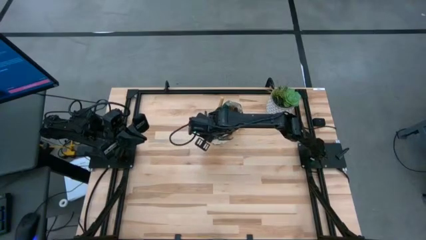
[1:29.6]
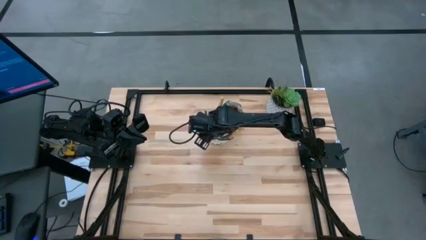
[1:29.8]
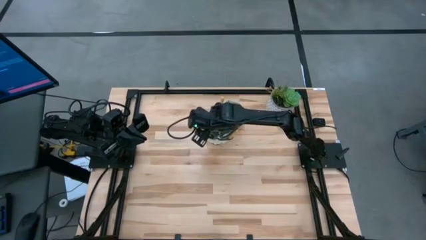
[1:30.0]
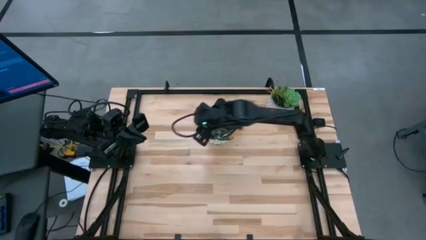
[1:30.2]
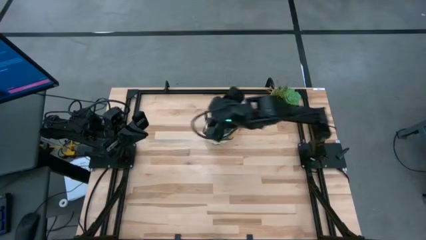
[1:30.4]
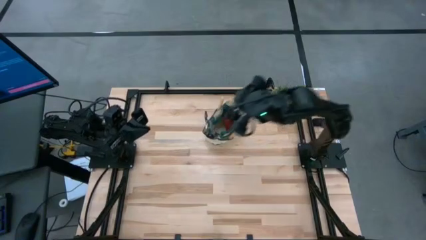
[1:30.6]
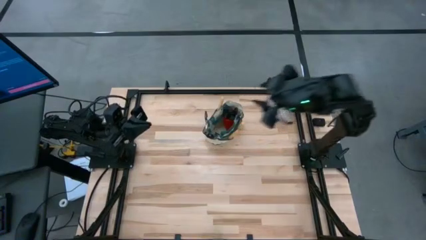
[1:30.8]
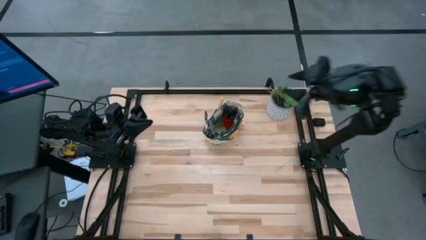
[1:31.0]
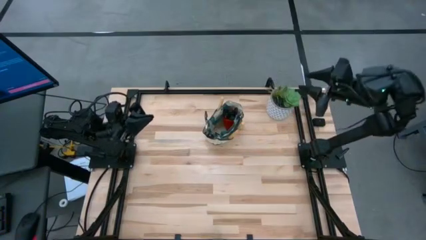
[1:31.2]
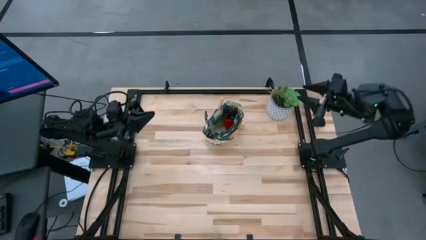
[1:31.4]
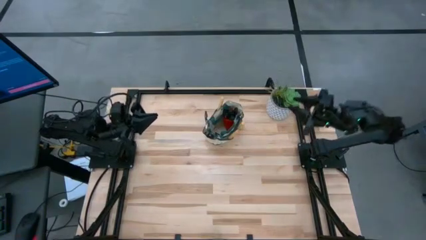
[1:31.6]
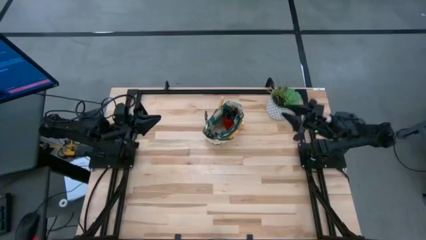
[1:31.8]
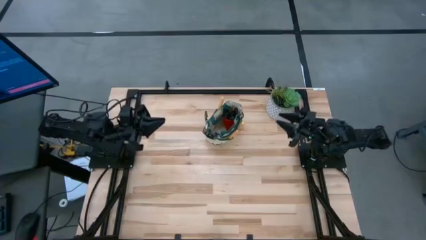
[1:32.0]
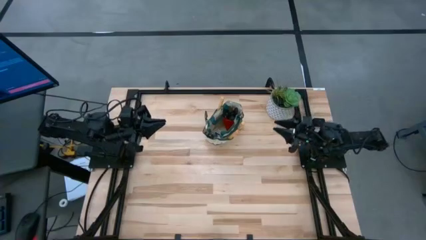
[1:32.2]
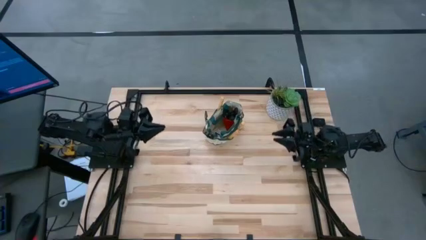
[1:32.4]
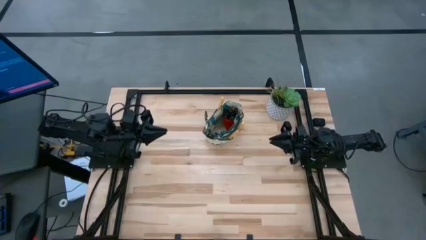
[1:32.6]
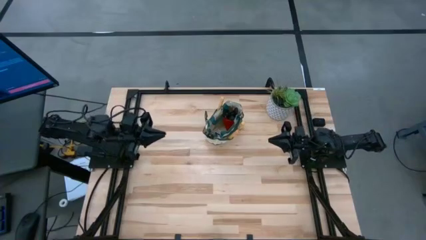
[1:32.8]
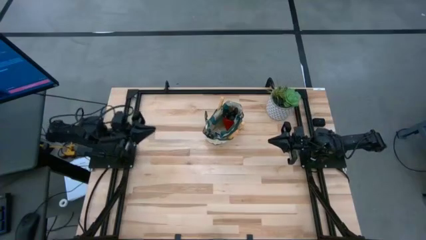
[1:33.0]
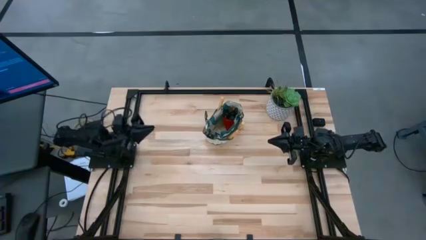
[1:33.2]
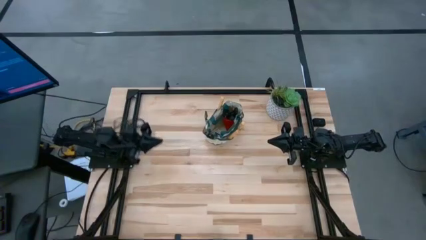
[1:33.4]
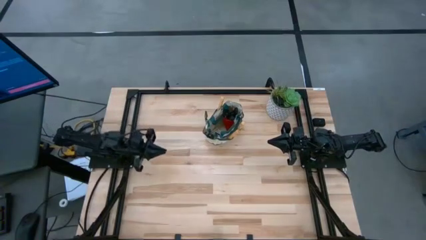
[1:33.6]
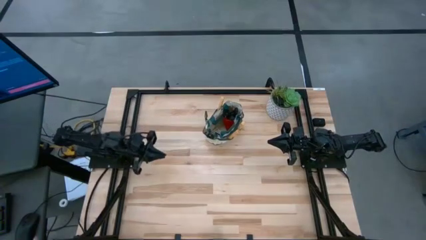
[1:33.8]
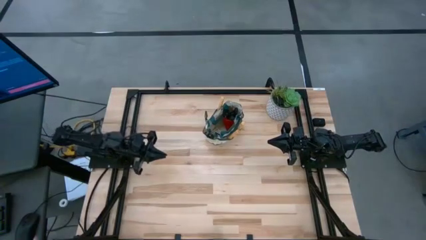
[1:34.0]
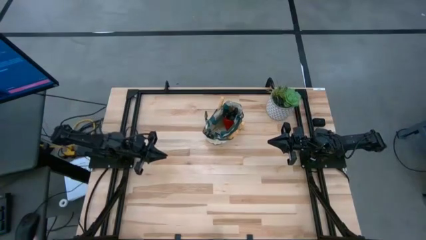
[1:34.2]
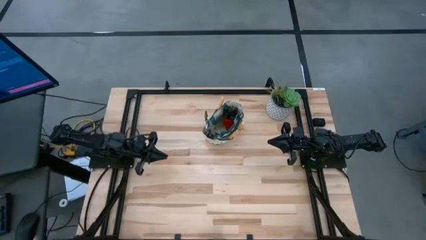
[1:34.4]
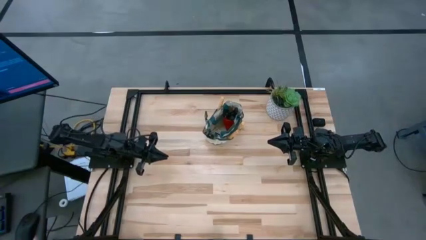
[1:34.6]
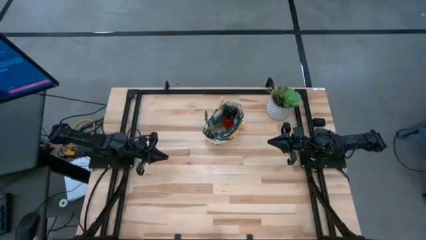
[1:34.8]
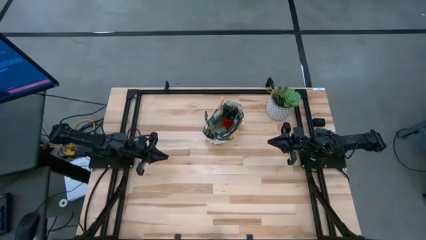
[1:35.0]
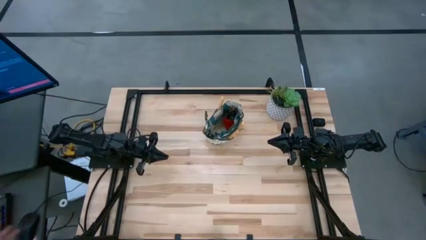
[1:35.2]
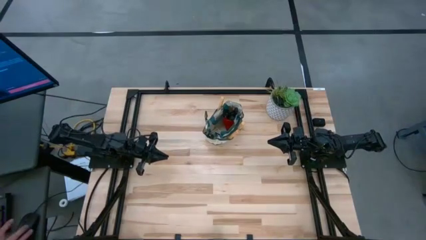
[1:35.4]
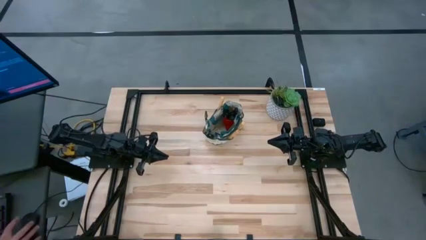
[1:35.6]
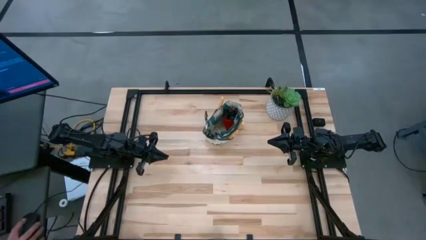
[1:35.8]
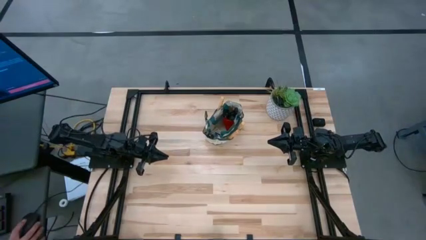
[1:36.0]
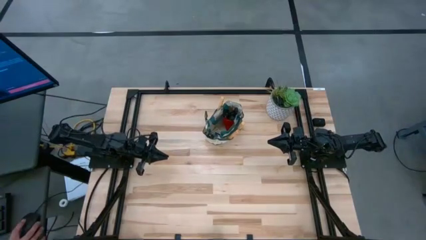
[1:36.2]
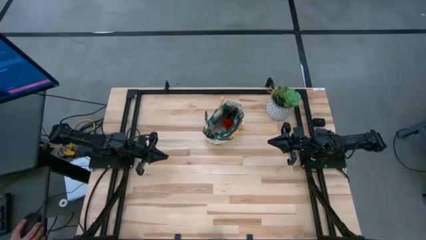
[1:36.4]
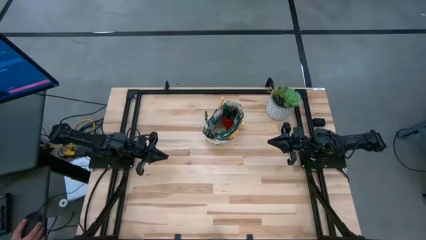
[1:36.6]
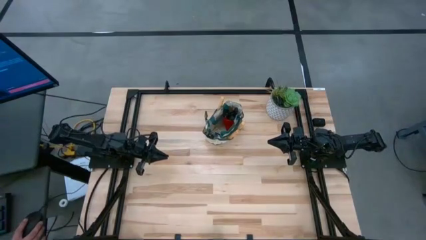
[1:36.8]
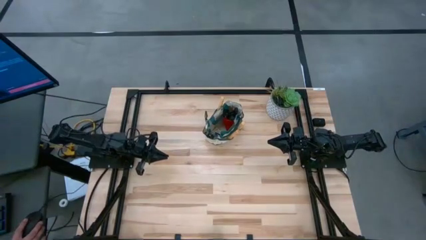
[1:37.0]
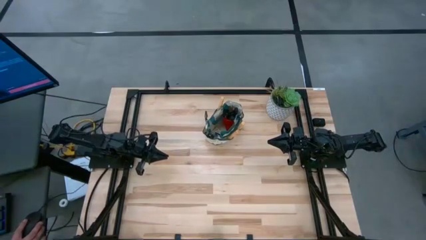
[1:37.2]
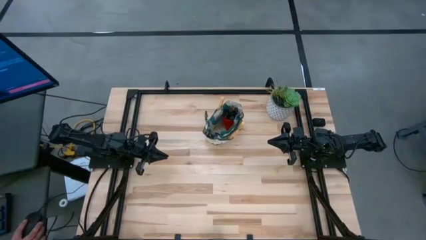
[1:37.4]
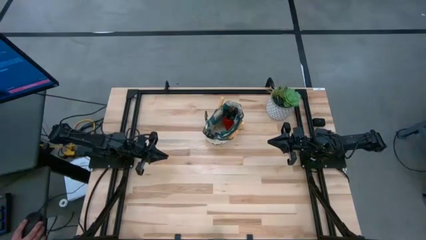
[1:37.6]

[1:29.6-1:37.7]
Task: Pick & Place Garden tools in Gardening bag
Return to Home Position

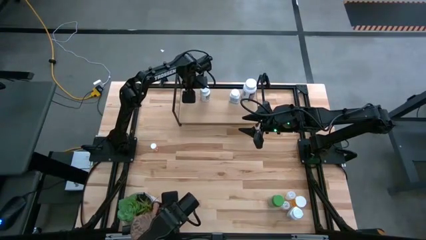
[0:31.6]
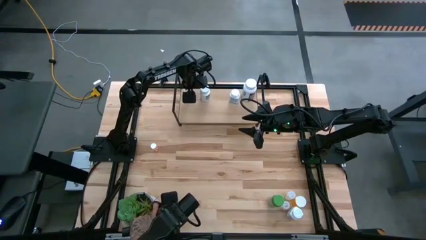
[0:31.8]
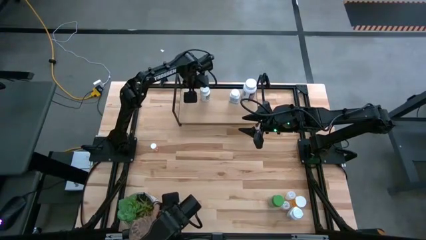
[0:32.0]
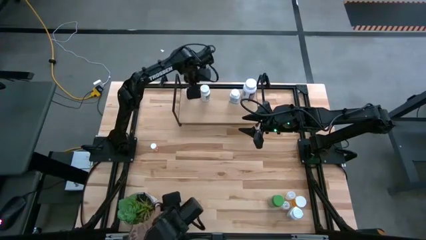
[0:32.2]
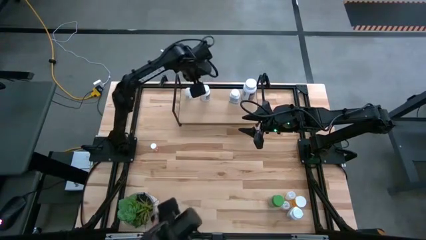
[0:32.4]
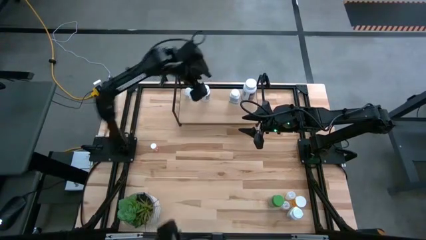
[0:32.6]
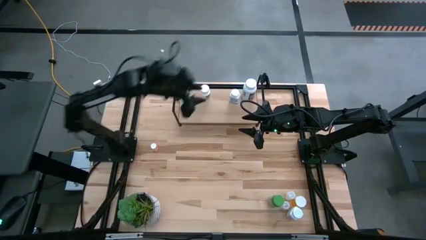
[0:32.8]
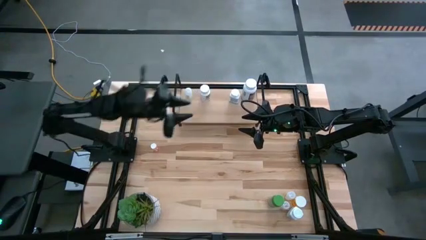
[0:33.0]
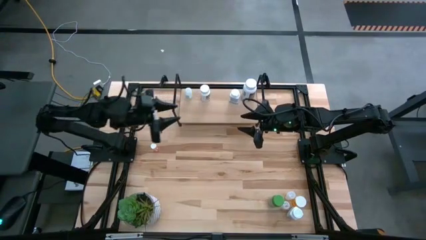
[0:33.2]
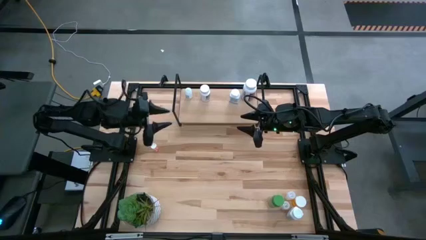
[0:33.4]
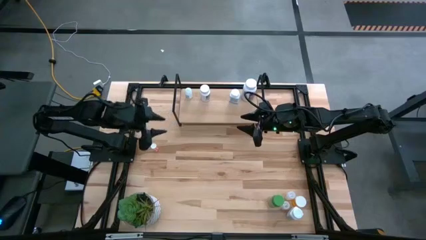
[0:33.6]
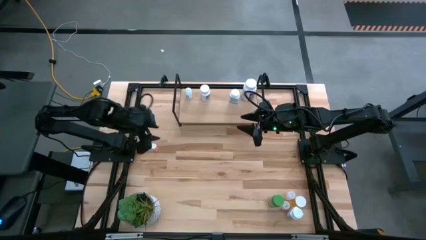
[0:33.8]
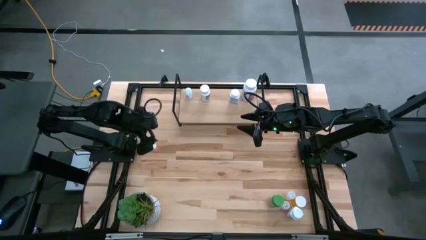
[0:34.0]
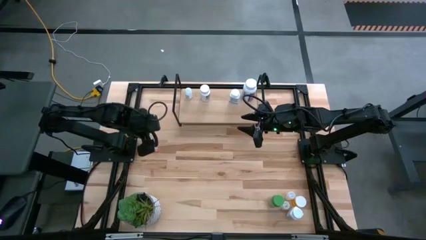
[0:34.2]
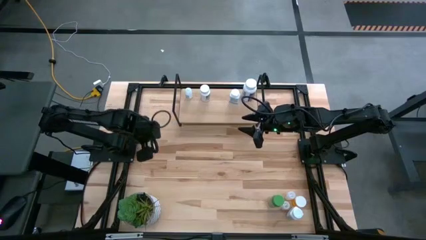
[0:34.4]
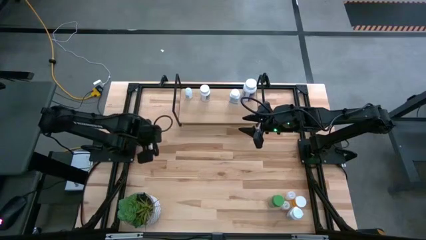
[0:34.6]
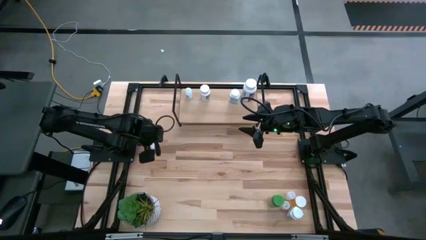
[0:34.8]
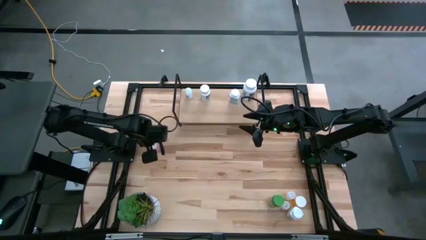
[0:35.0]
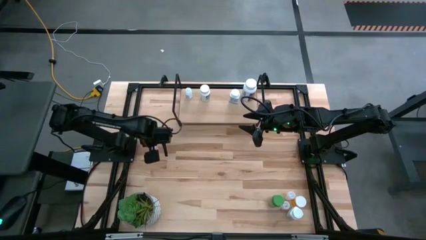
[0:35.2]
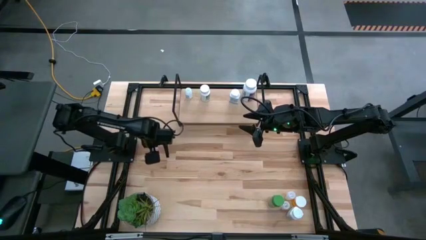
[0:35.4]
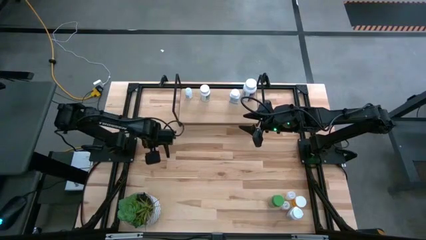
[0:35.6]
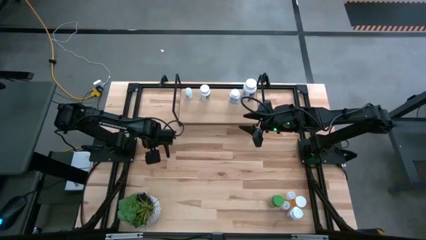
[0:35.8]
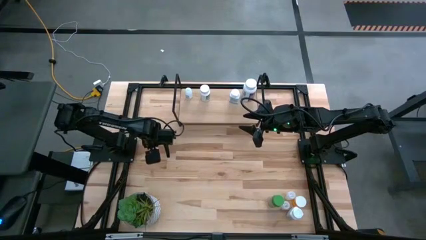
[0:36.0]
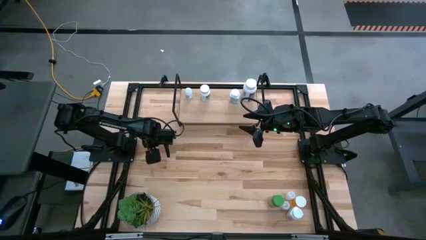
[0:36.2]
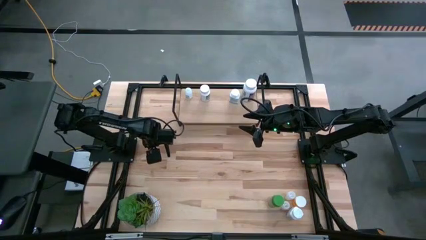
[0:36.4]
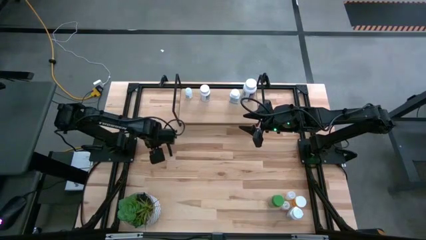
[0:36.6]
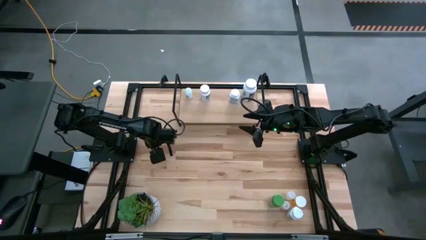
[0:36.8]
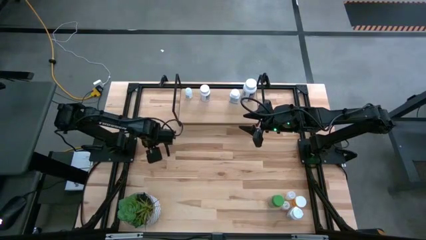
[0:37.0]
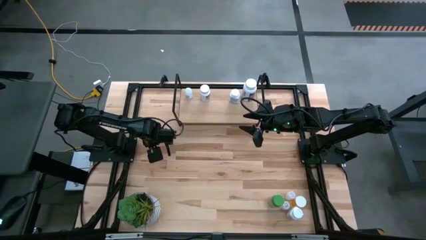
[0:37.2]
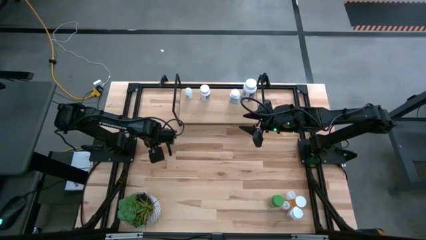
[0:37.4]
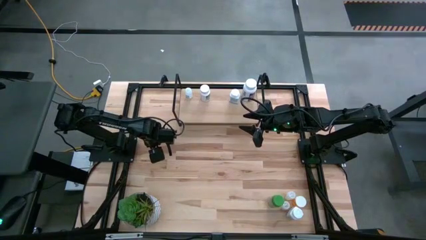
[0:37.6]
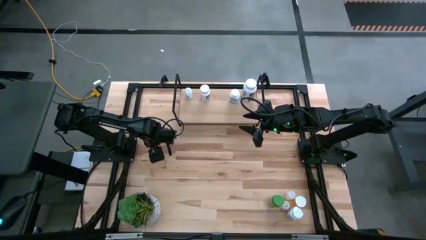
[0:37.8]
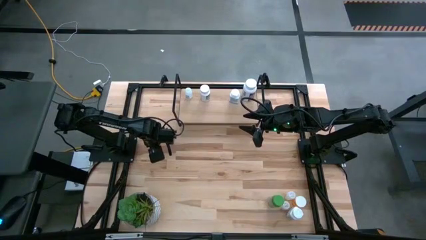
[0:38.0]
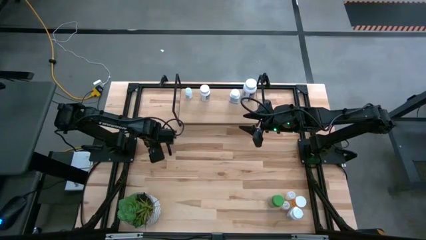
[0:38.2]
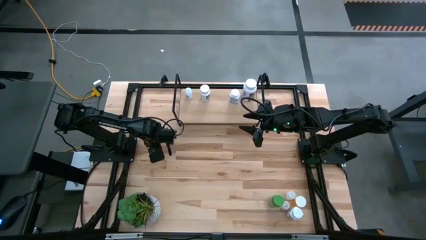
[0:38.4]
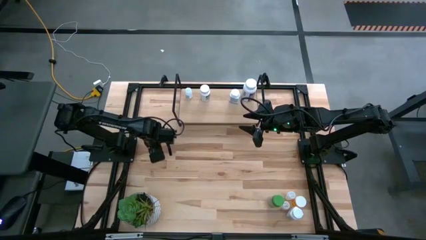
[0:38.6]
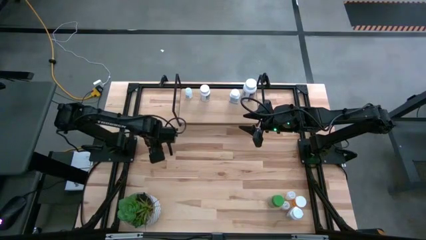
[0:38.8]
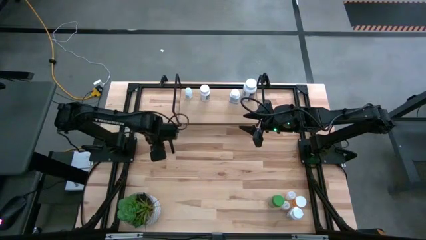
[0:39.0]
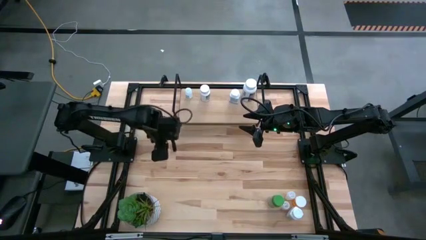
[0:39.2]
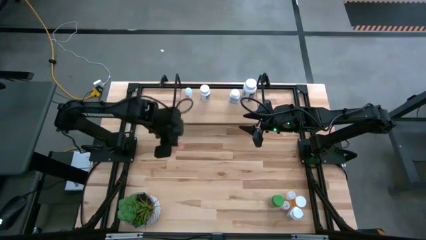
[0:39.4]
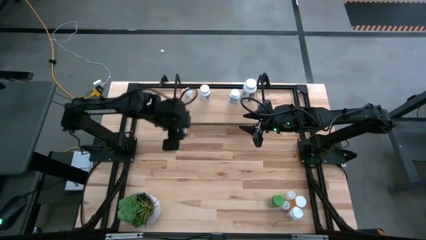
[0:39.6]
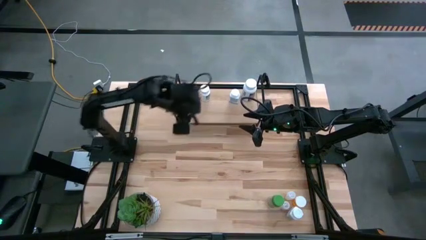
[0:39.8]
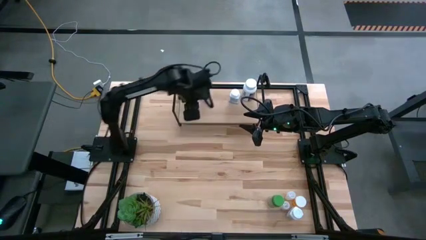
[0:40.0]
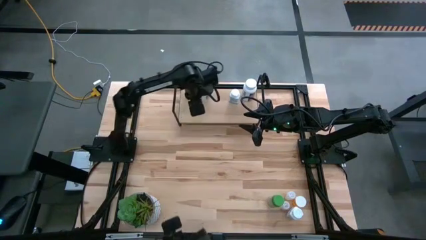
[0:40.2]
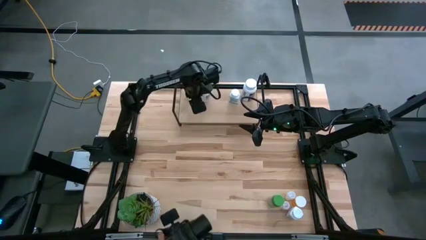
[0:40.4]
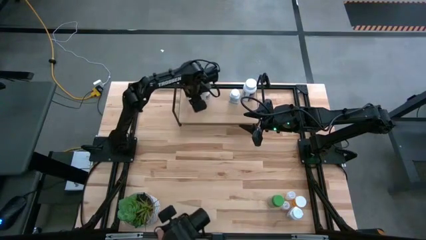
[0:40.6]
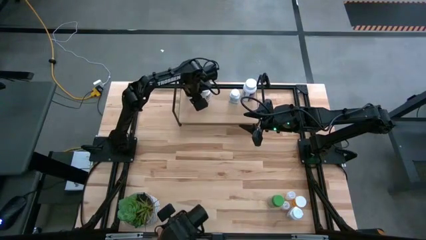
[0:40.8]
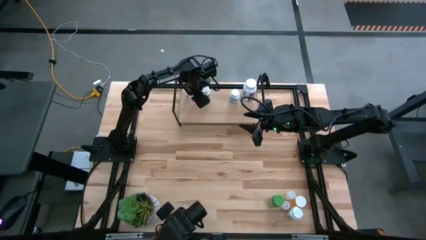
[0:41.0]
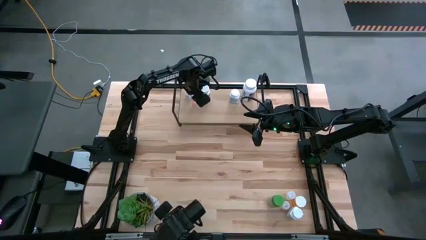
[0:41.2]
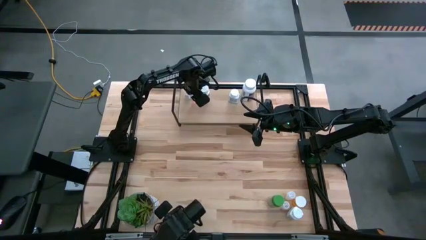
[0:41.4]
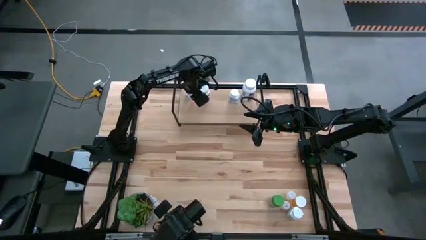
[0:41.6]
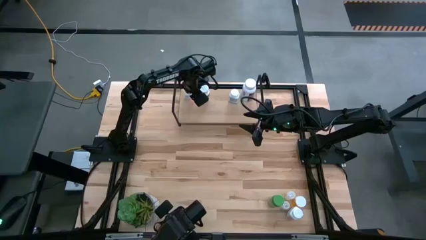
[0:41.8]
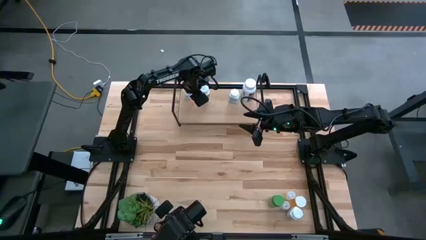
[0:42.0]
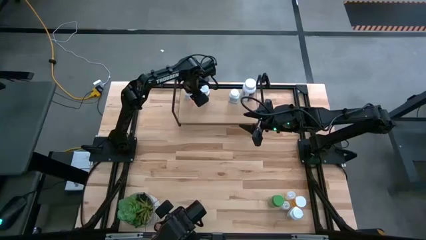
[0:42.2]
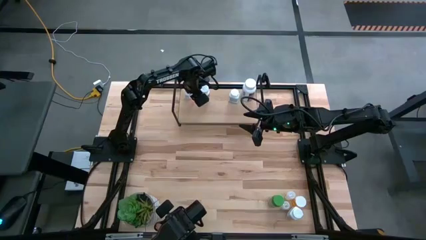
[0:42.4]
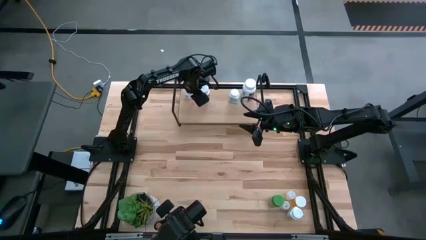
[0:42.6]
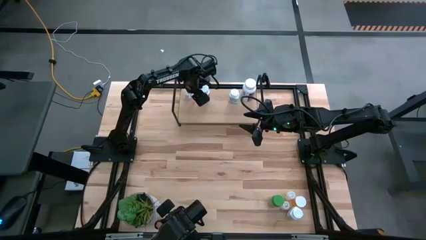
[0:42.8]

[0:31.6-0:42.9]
Task: Pick and place medicine bottles onto shelf by color
Put the orange pill bottle on the shelf
